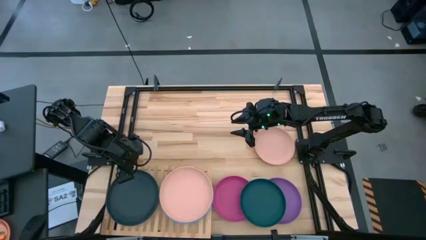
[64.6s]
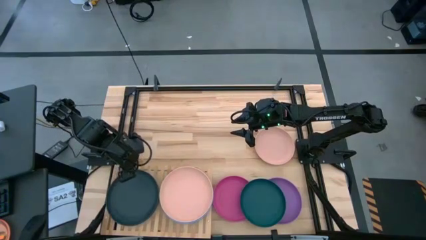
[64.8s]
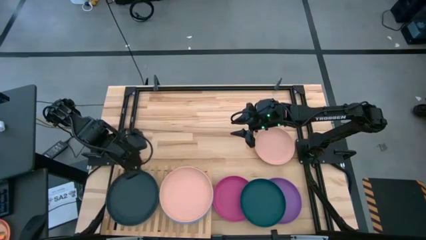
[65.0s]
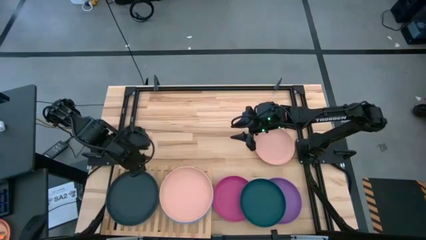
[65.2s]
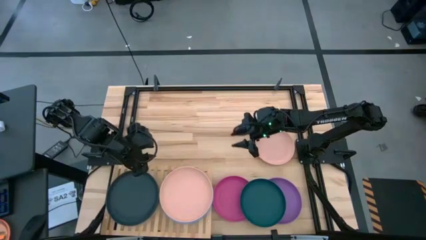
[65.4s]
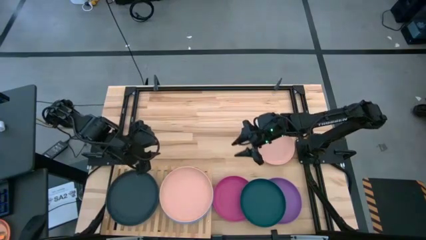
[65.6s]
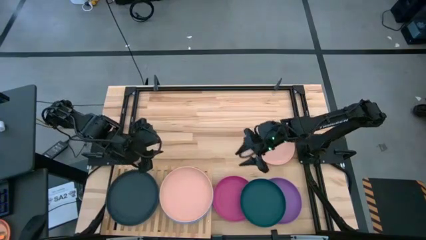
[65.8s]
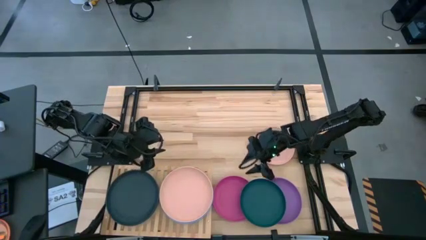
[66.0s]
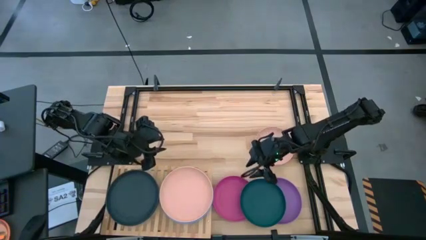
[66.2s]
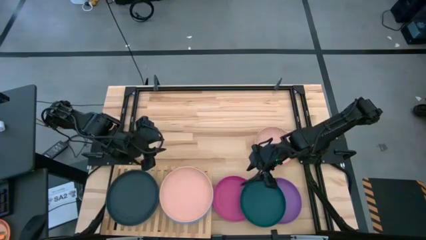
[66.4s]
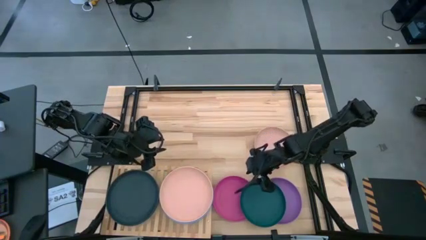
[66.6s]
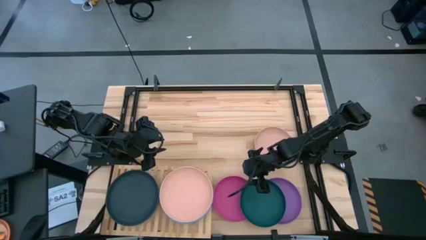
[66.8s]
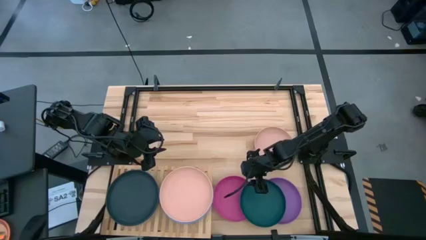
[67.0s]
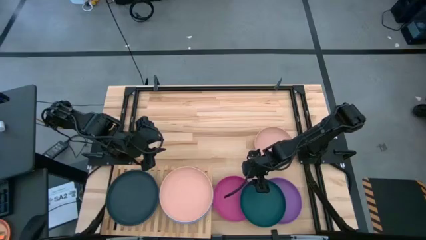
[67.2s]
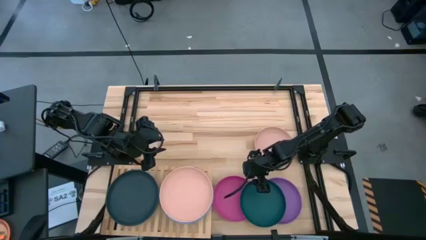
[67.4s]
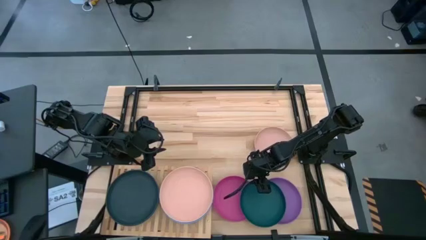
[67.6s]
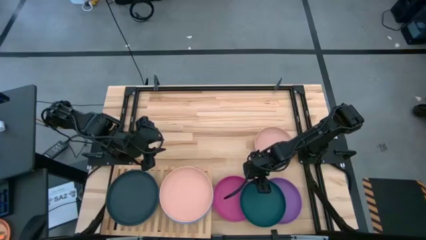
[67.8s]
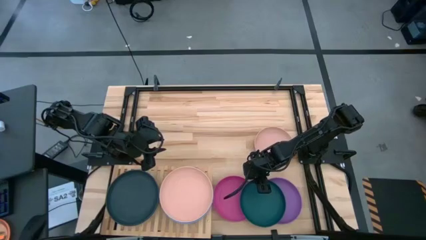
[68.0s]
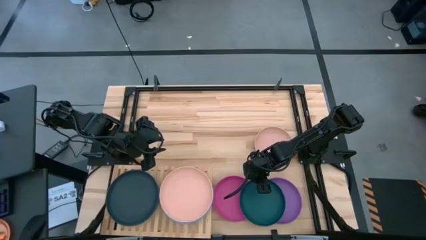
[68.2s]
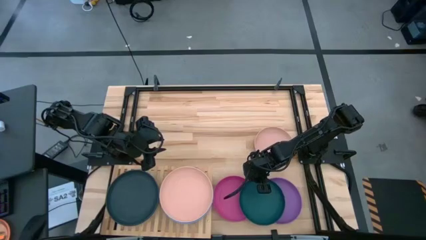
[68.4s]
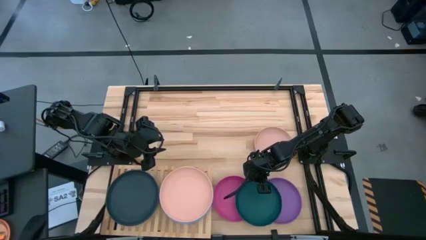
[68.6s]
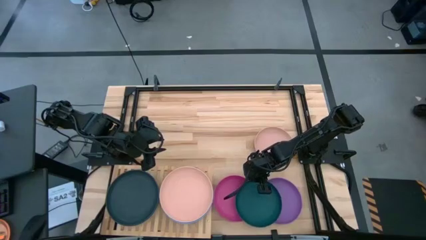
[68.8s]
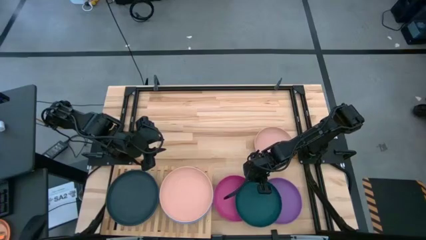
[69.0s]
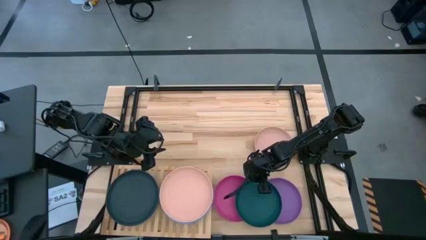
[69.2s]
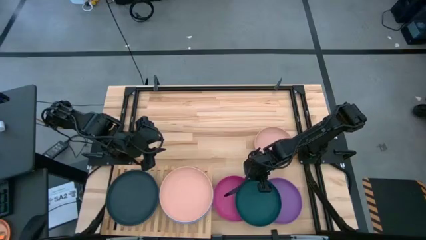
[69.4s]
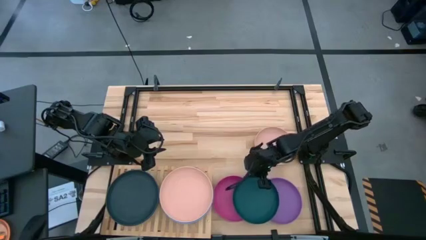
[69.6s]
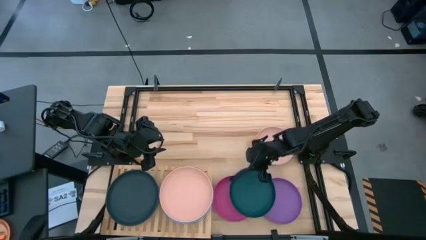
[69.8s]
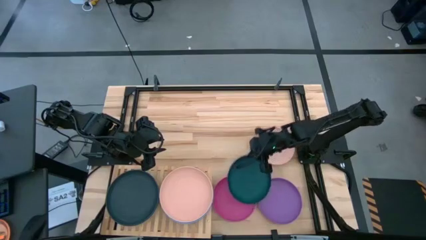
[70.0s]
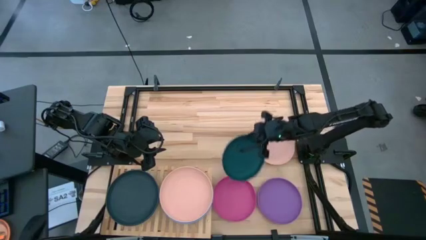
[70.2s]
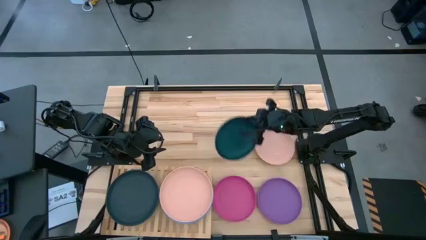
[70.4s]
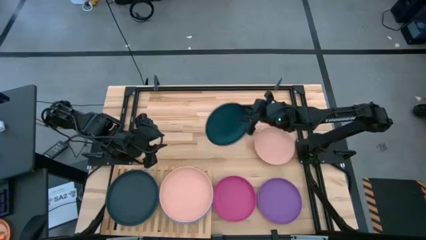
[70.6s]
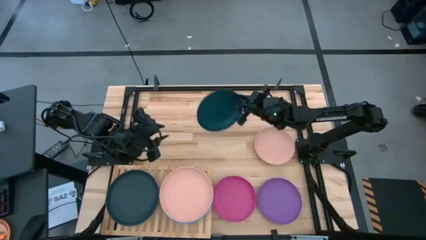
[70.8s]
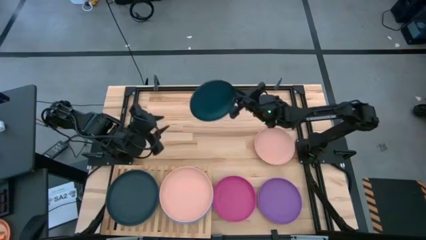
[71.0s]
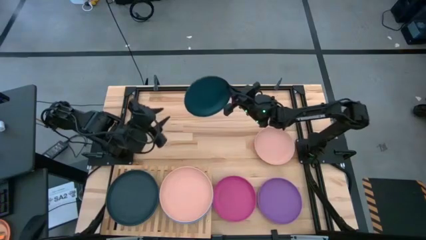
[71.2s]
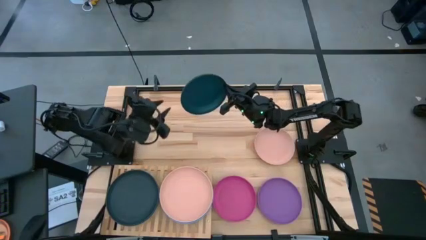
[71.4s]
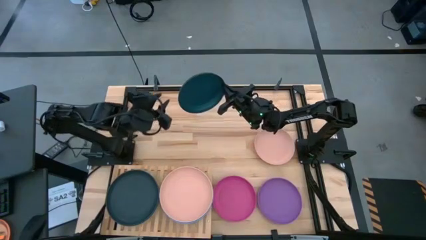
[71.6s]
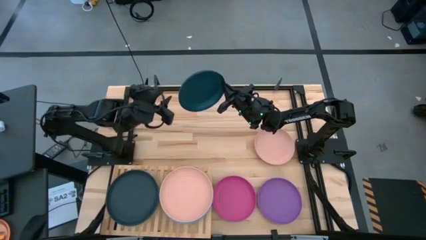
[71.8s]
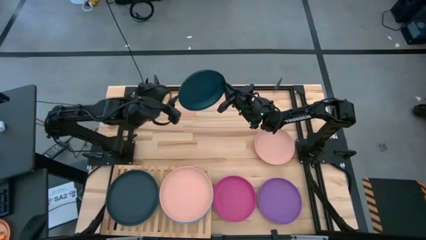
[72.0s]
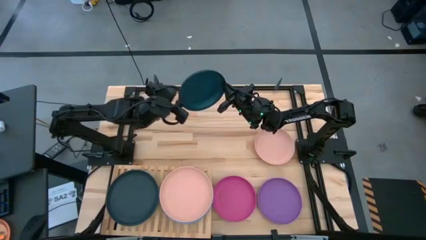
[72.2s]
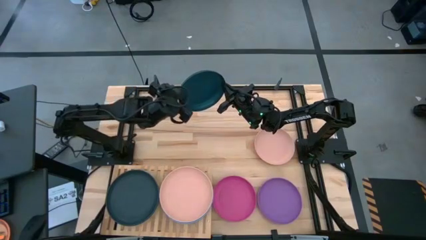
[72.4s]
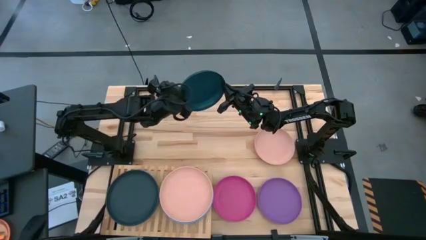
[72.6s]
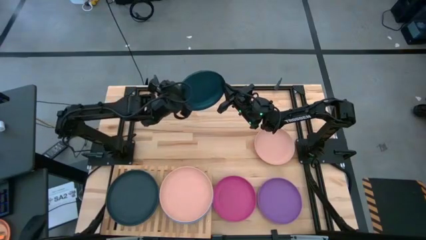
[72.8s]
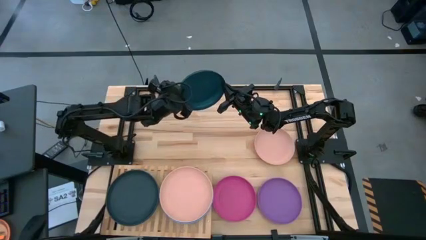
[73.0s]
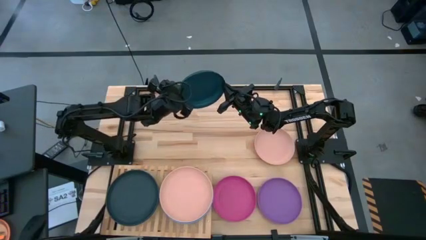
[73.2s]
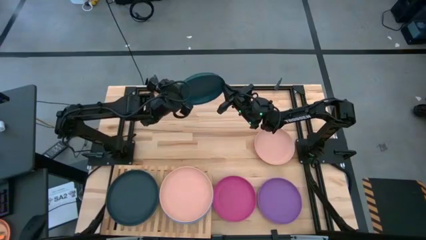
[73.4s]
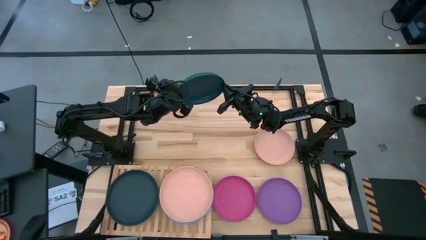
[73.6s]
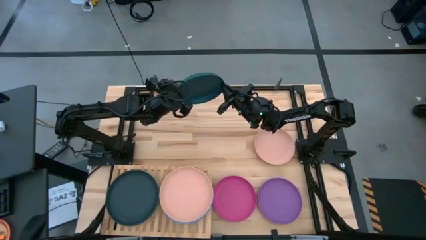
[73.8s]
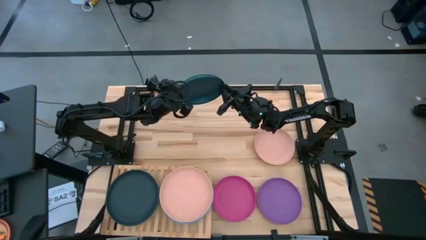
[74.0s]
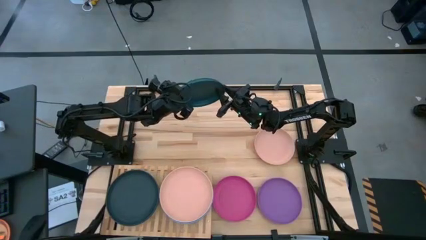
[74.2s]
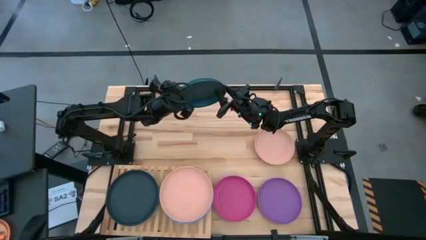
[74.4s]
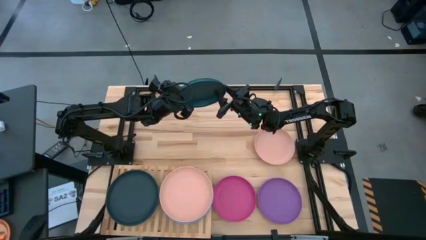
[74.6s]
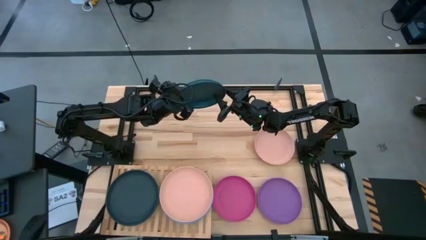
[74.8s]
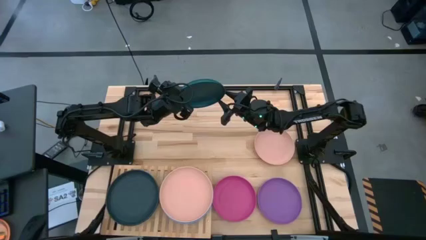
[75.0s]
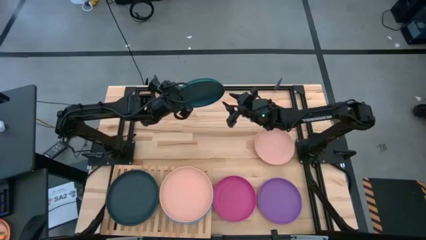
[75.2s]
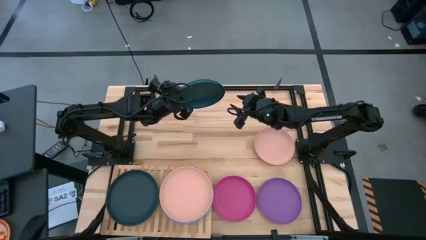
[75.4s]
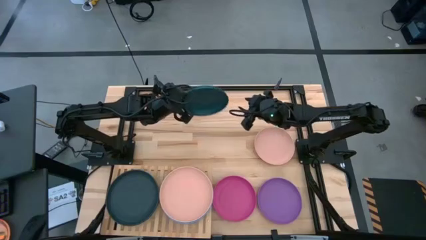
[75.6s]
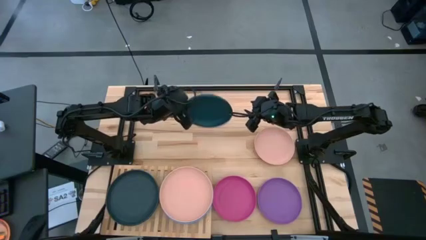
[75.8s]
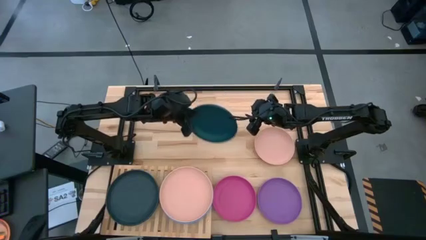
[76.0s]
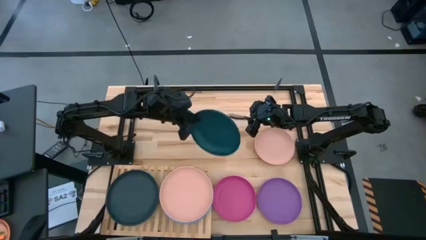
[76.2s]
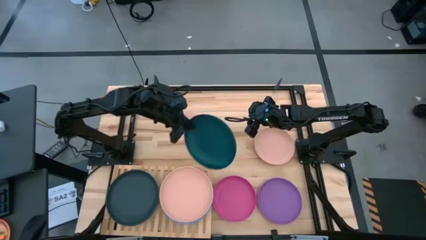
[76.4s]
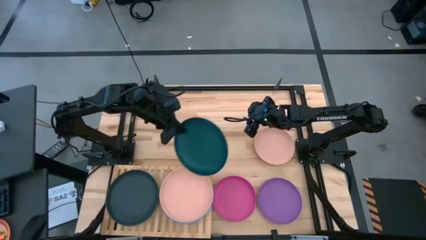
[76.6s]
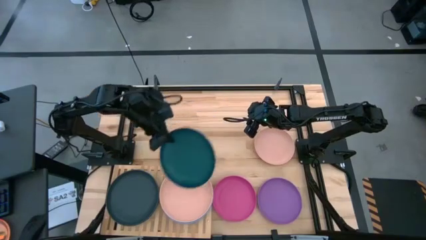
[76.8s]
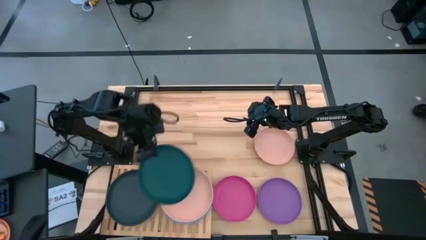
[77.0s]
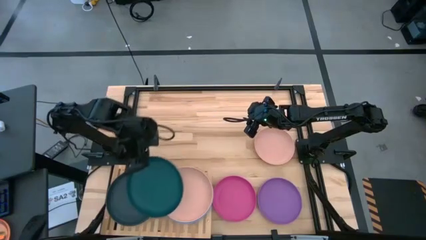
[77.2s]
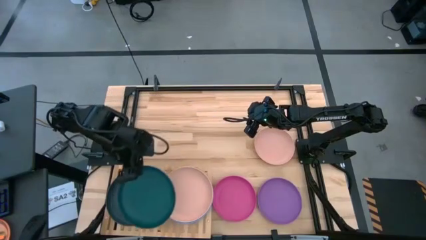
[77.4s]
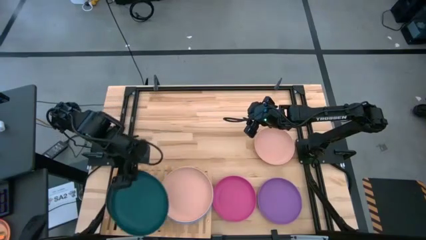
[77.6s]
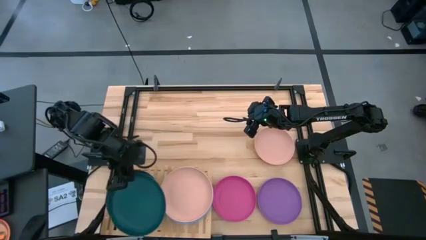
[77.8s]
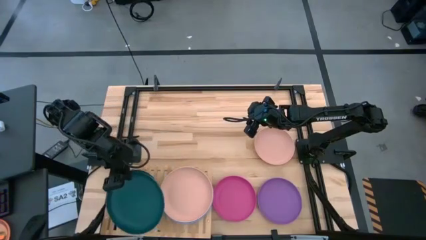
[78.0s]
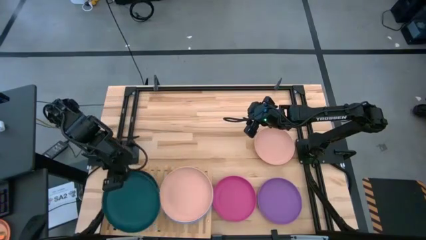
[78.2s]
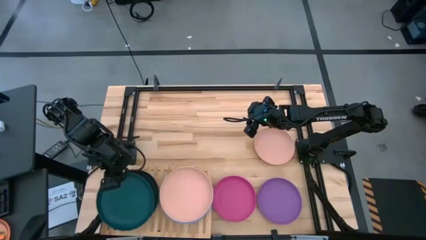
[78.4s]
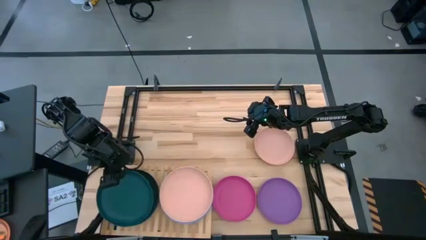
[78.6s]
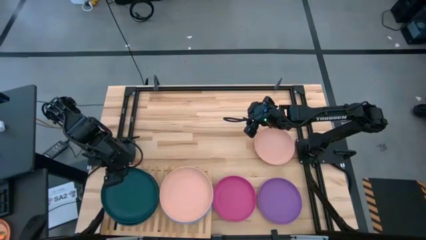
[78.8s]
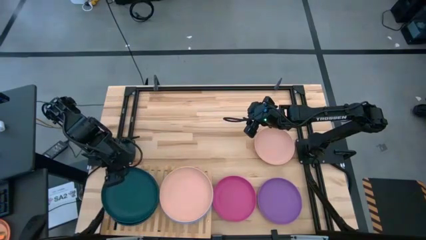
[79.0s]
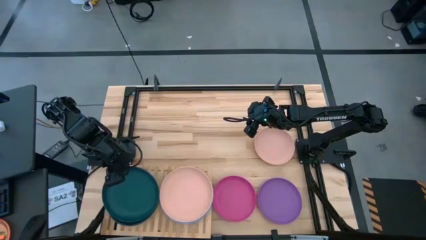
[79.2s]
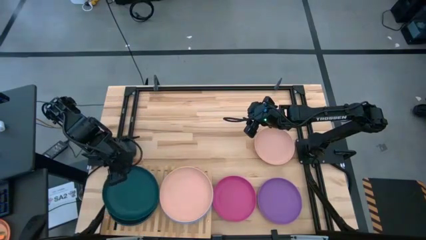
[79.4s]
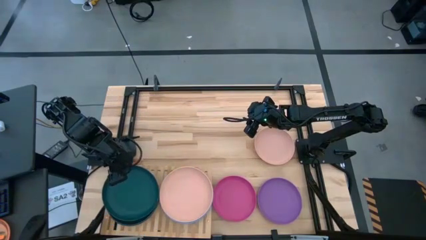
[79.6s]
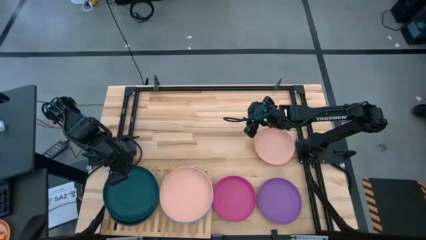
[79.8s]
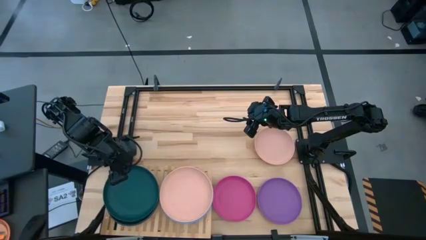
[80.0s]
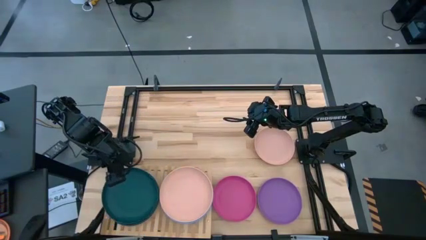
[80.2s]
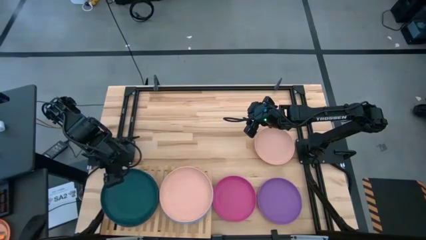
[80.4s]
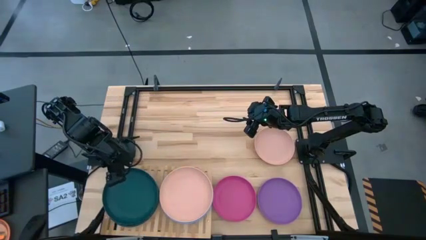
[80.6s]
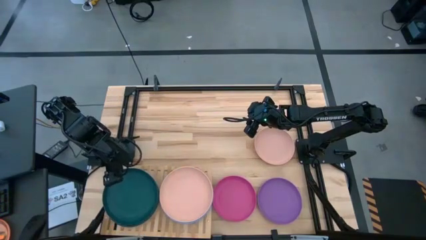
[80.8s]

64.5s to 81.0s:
Task: Place and stack plates onto a shelf
Stack the dark green plate on top of the dark green plate on the shelf
